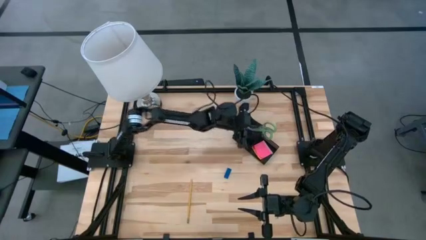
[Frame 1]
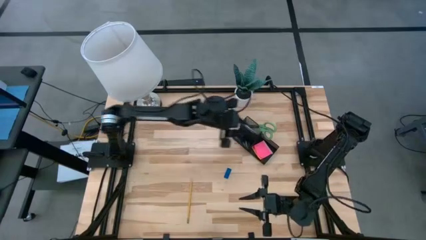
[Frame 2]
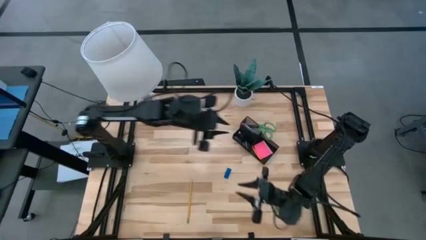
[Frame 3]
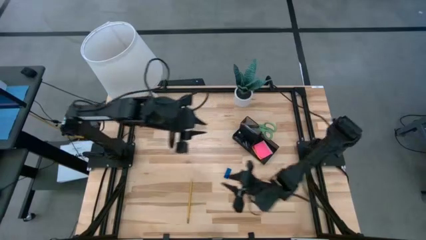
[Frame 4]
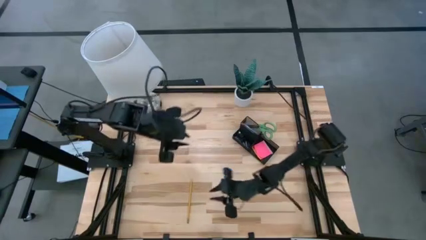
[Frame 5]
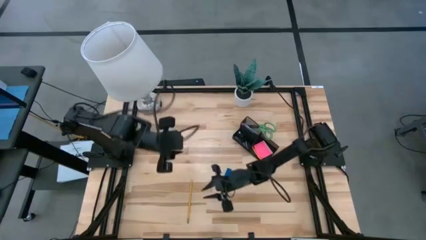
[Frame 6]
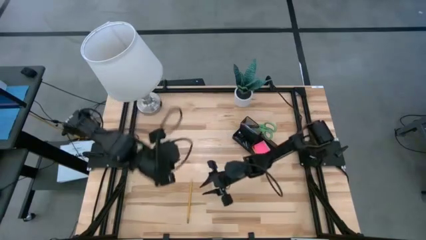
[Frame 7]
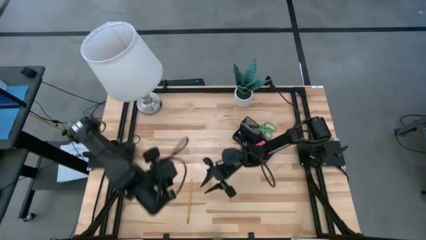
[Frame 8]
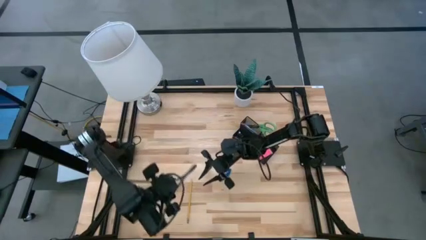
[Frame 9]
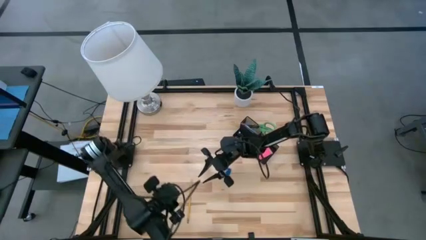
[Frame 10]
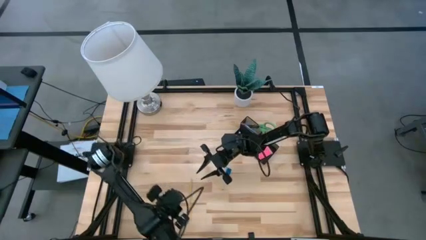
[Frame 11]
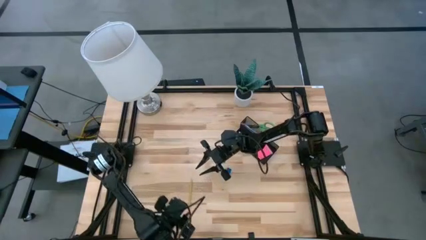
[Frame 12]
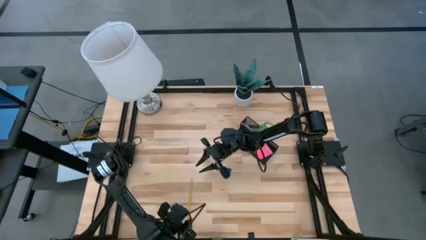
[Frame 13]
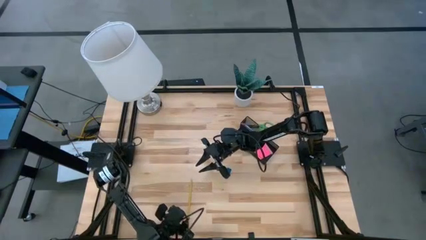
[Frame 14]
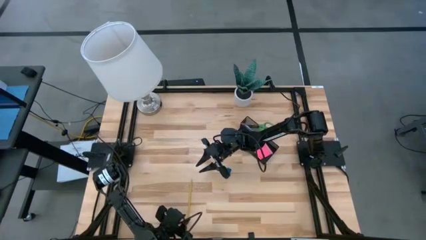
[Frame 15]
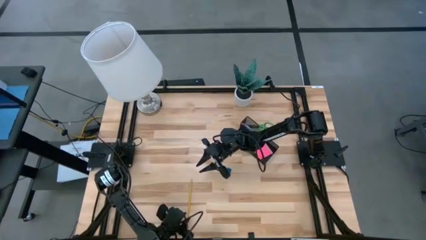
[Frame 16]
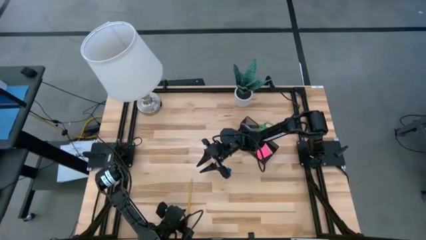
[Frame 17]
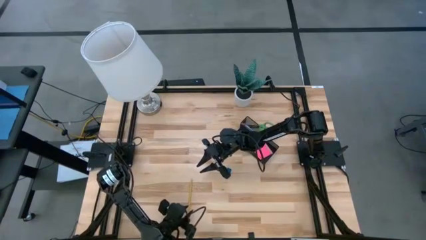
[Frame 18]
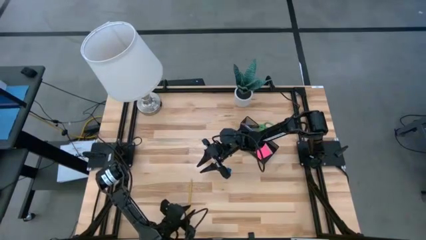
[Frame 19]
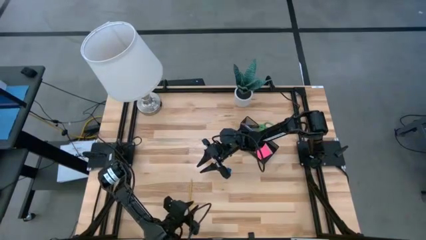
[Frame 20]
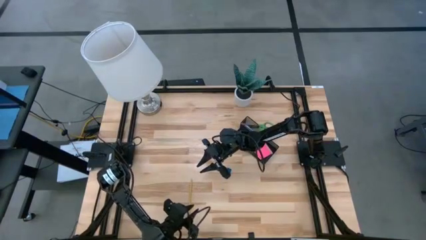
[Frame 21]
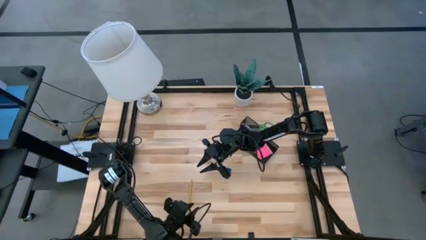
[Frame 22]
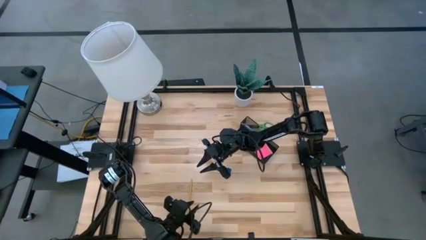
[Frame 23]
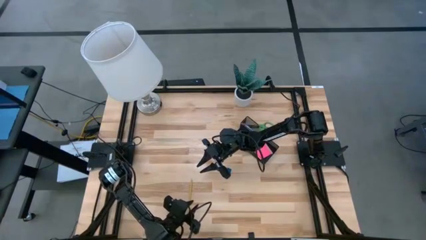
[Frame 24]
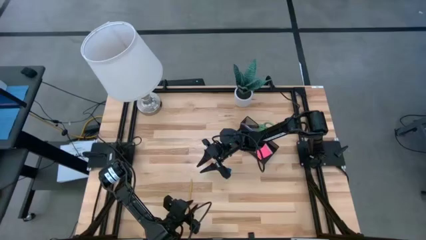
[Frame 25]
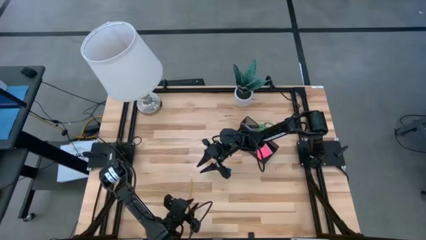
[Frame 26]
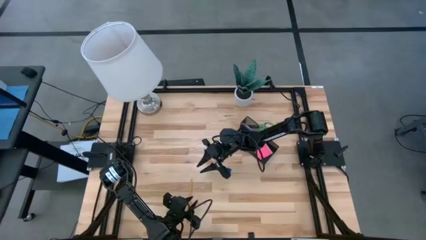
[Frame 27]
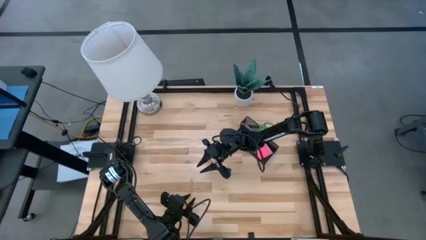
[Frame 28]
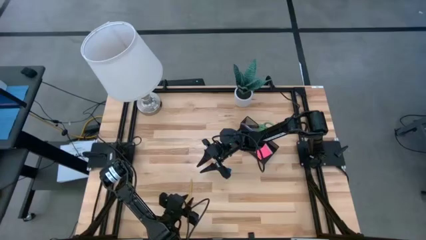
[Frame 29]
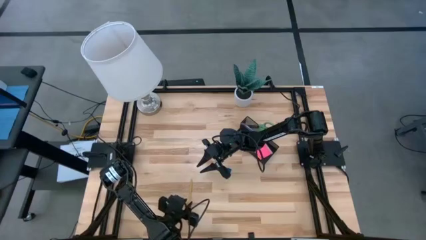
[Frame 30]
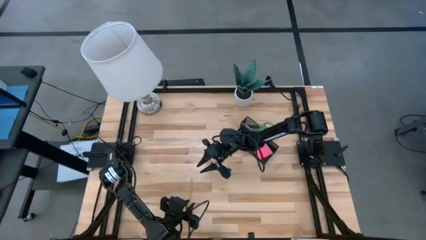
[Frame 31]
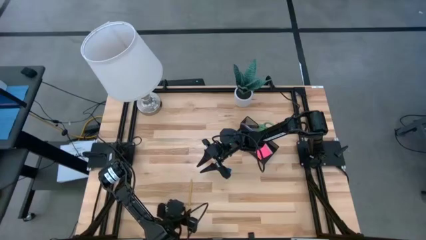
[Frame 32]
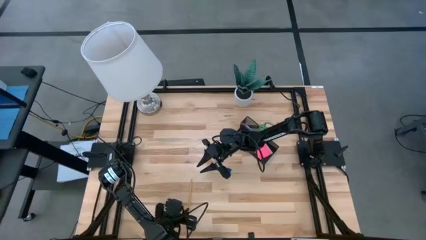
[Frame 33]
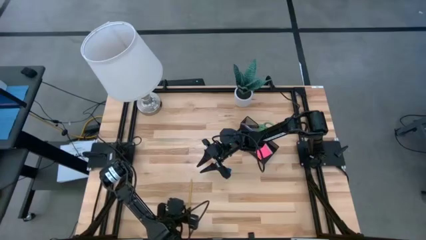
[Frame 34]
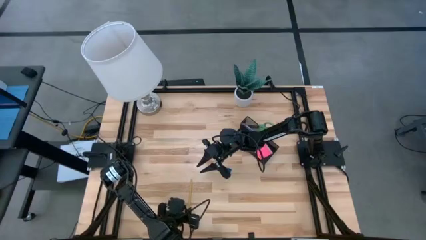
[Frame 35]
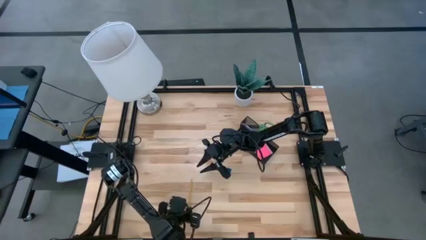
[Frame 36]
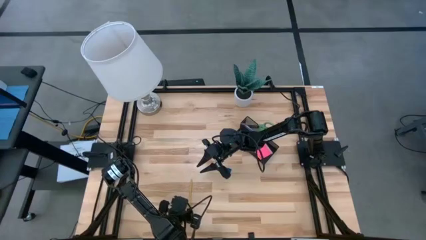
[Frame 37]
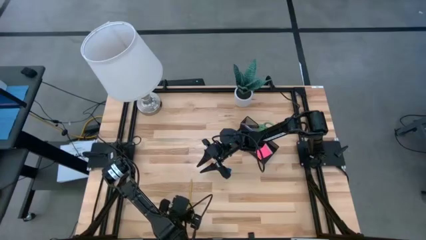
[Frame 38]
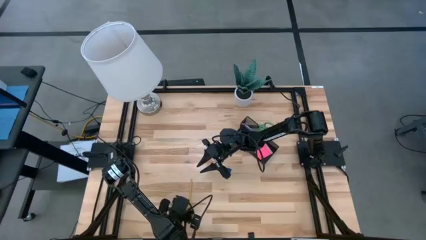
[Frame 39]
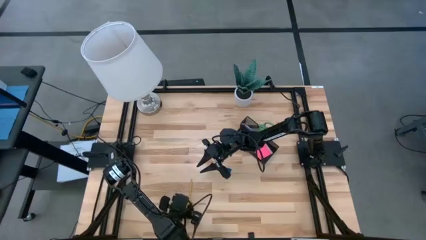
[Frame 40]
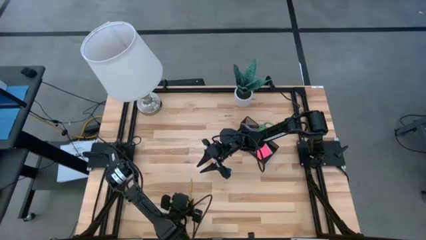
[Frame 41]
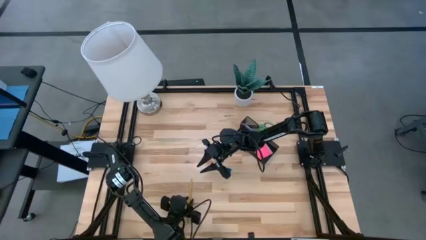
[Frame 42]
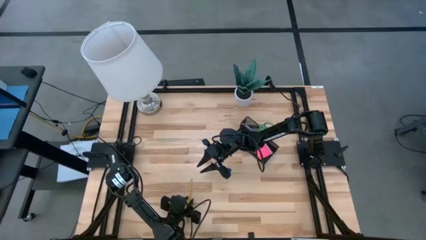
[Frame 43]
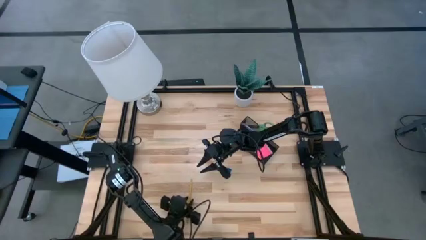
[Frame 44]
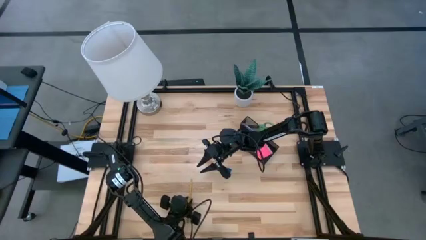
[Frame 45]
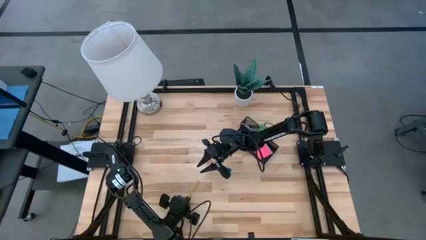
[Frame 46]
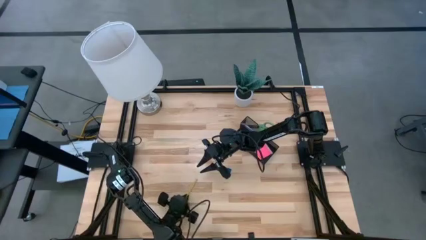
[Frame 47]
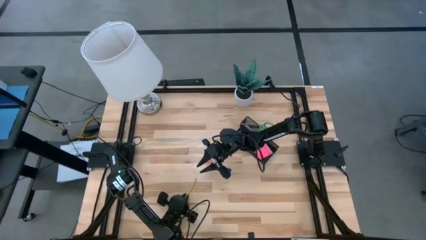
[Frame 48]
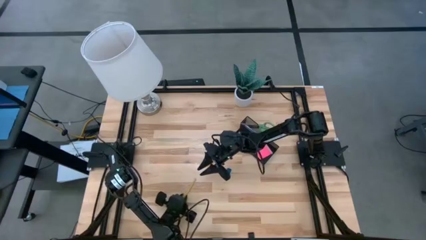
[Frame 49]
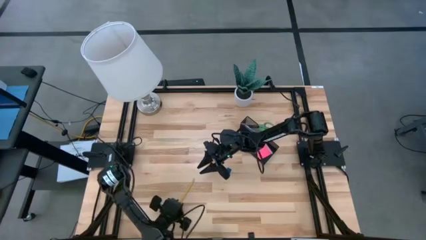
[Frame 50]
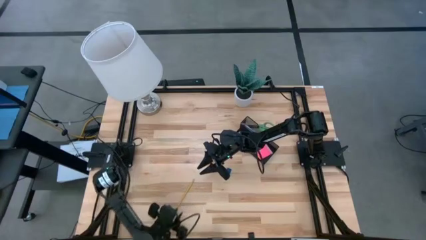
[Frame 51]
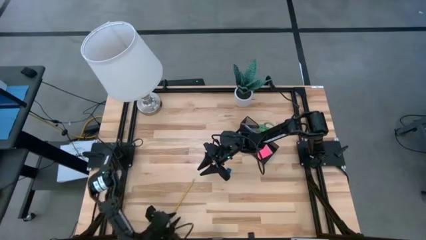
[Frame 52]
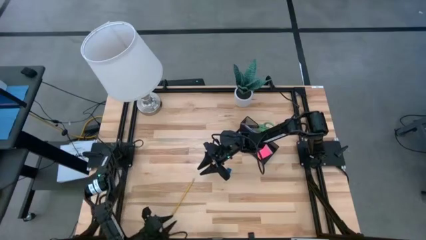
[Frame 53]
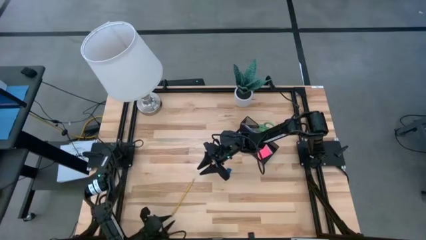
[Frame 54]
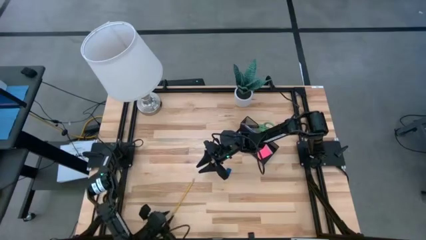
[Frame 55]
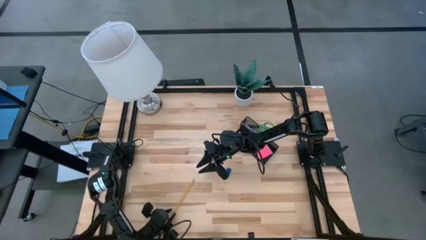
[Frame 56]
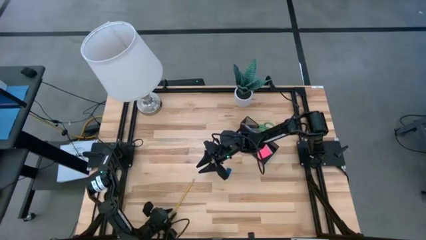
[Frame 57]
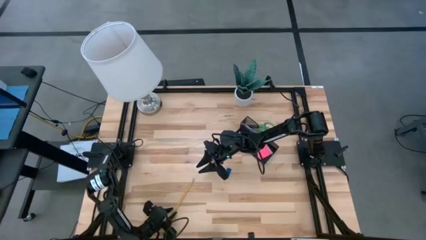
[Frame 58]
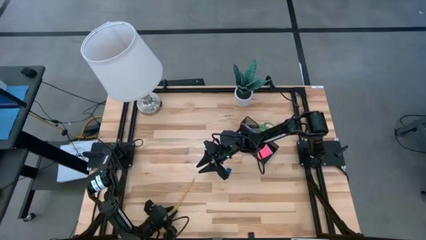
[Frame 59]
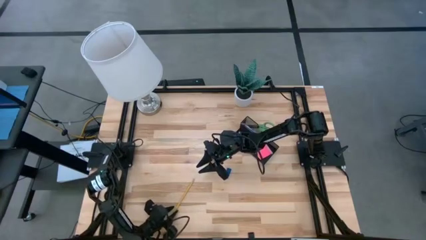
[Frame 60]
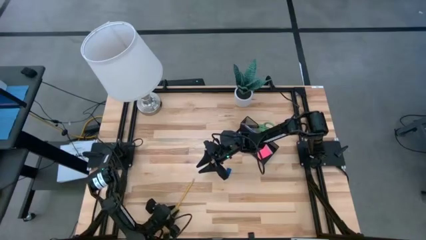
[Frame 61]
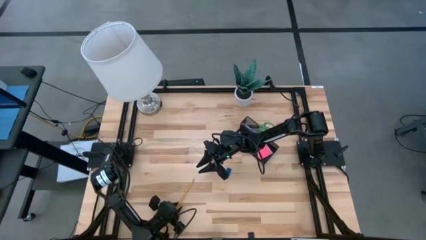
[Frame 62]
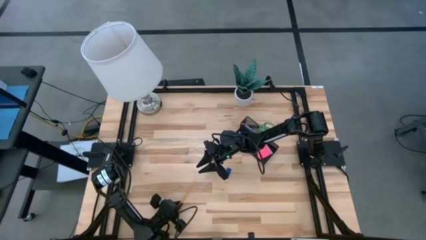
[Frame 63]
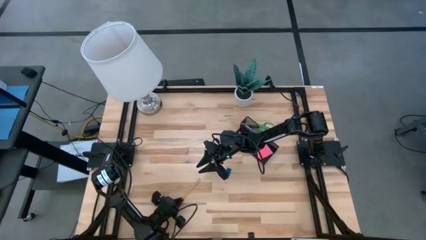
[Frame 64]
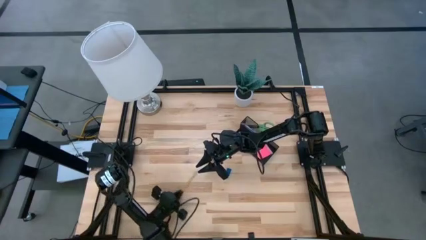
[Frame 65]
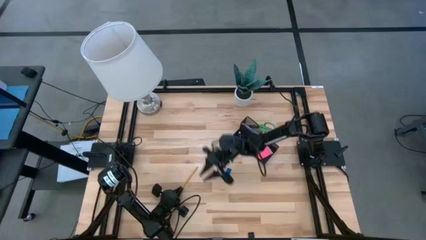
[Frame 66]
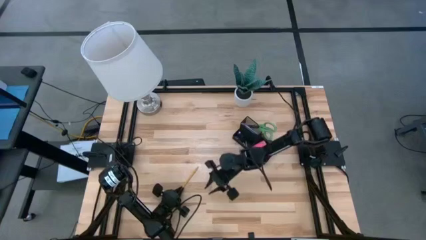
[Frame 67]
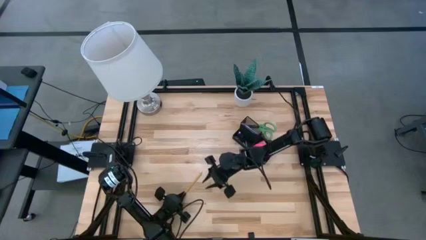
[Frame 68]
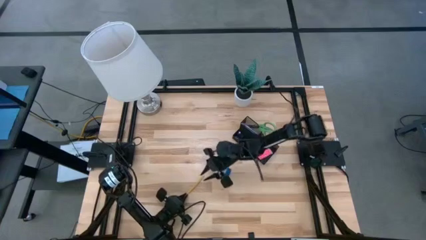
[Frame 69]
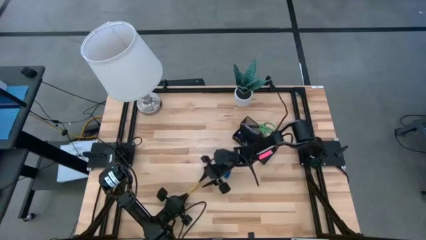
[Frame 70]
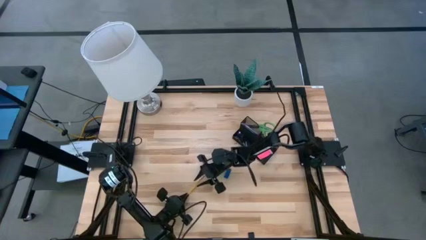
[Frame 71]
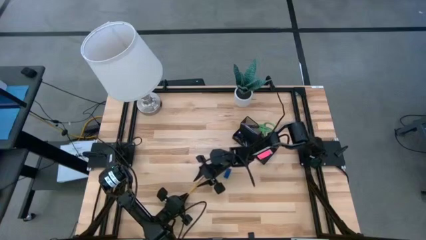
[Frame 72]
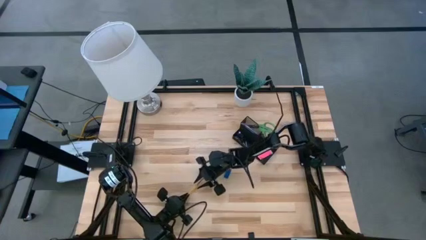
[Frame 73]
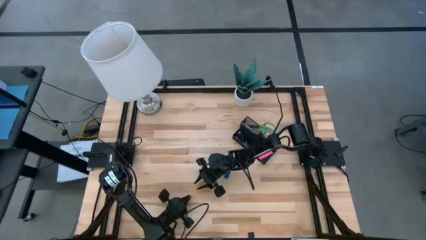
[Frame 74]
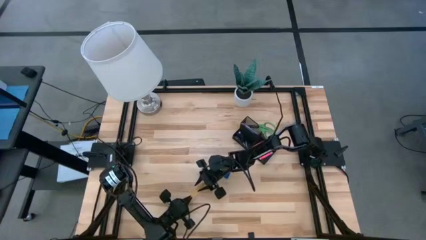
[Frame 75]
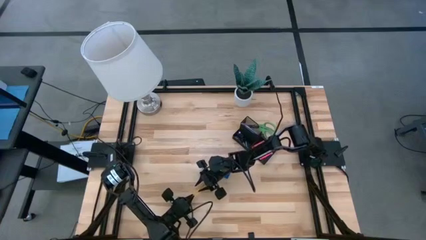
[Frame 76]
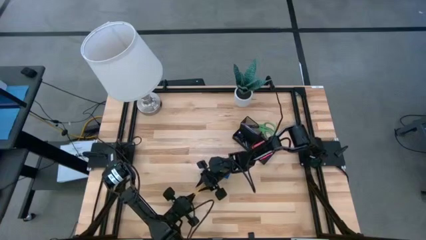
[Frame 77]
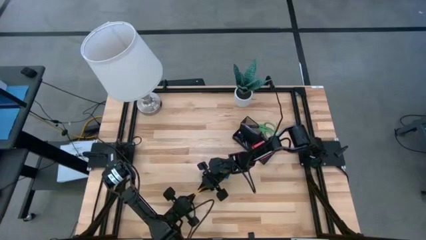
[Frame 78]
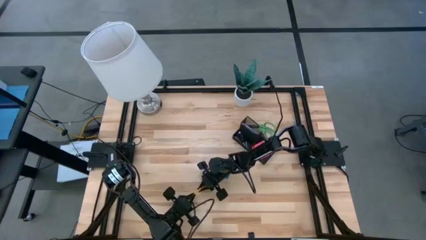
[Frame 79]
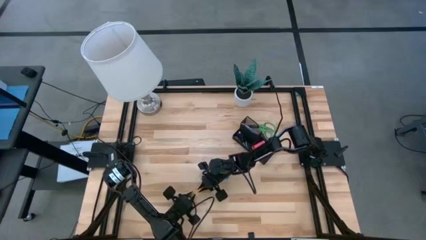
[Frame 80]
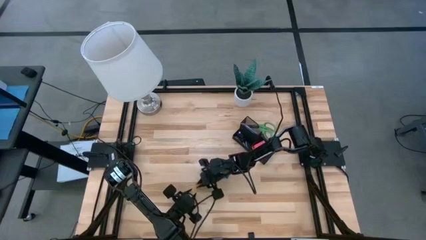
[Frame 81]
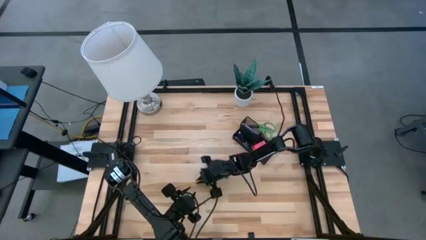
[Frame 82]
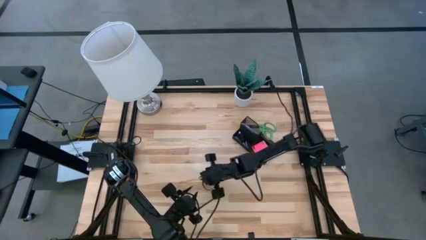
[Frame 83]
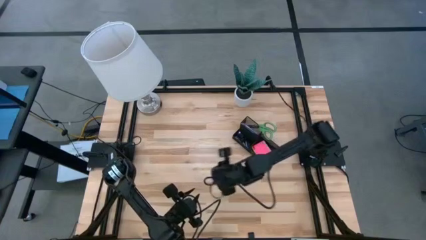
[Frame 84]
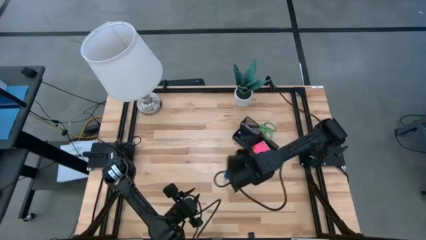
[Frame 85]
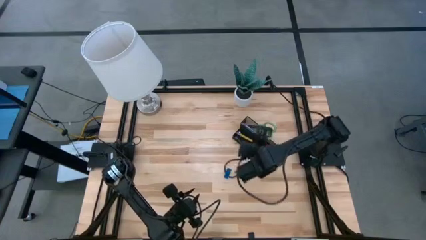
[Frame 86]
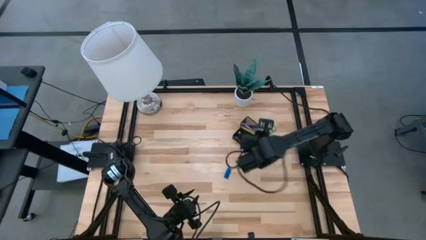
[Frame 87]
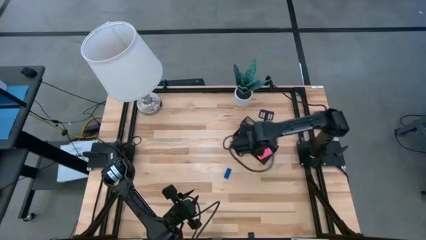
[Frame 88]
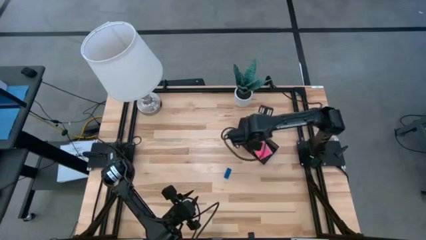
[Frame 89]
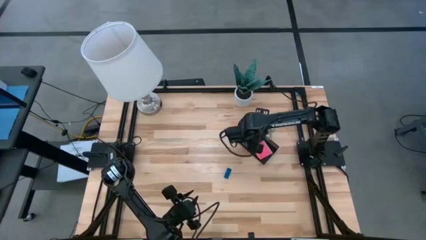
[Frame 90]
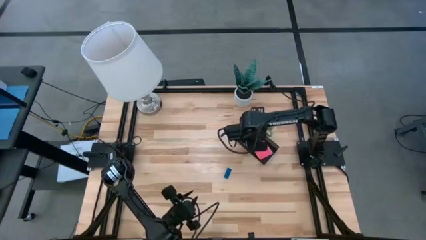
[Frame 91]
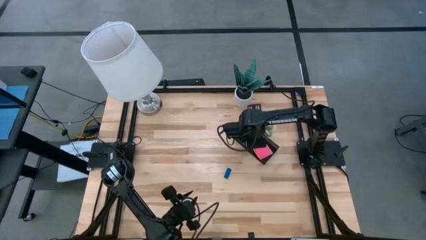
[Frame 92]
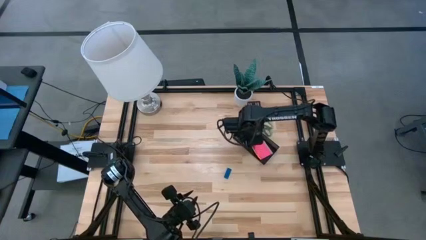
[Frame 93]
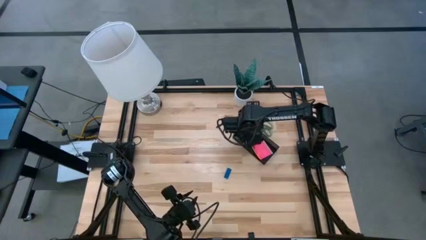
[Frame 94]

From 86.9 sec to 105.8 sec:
Task: Pick and place office supplies into organizer
Put the yellow pencil into the desk organizer
